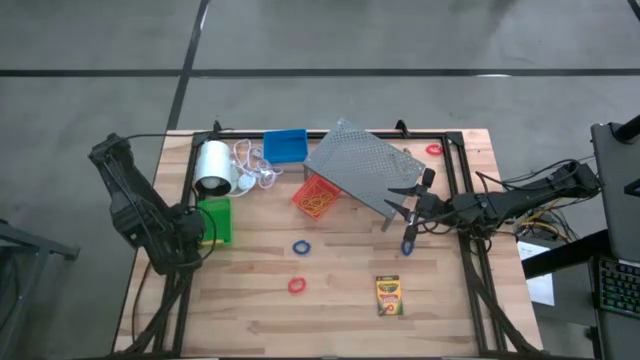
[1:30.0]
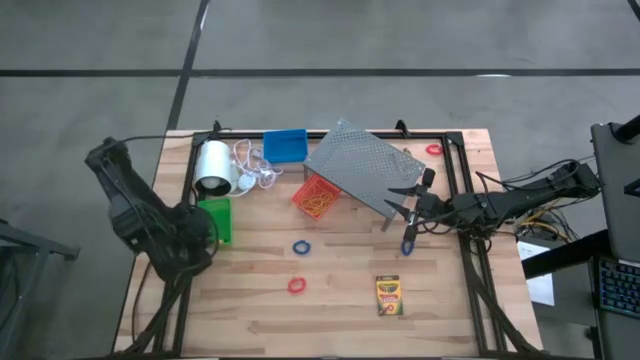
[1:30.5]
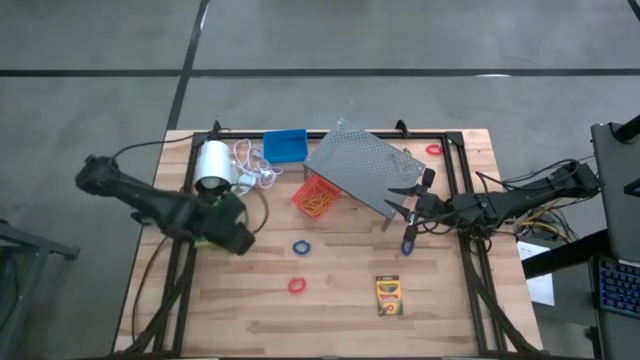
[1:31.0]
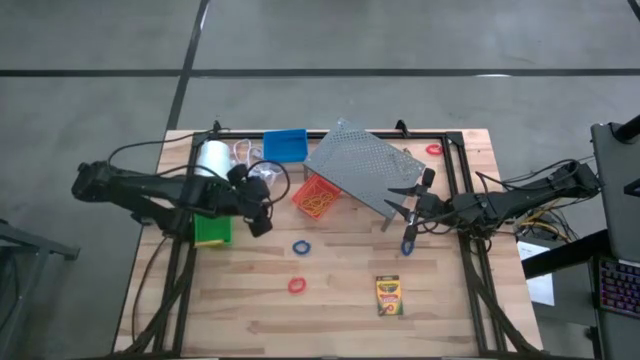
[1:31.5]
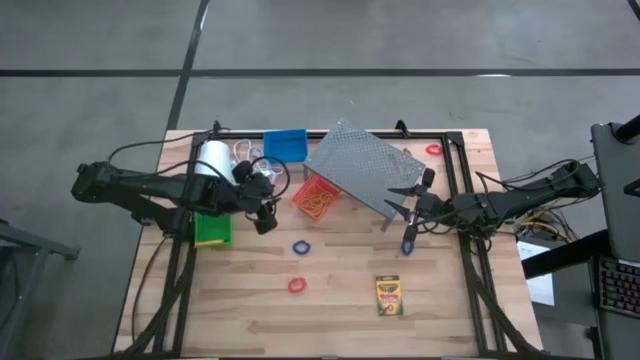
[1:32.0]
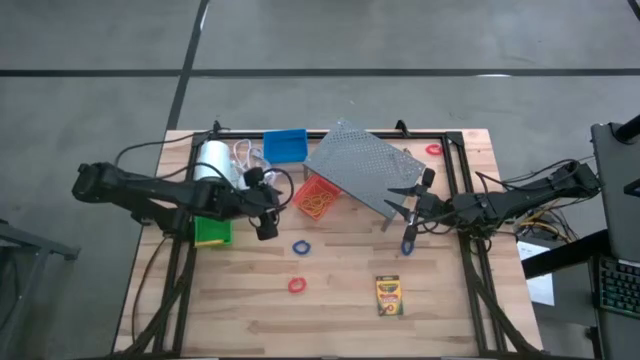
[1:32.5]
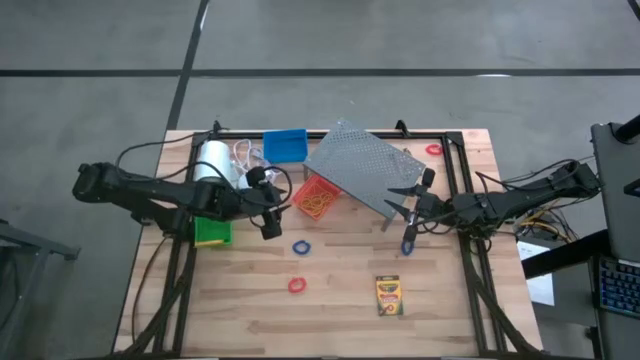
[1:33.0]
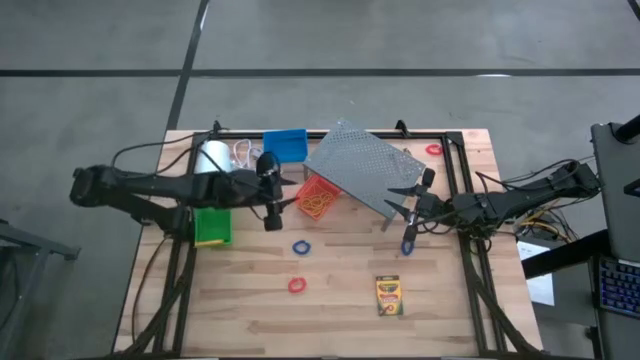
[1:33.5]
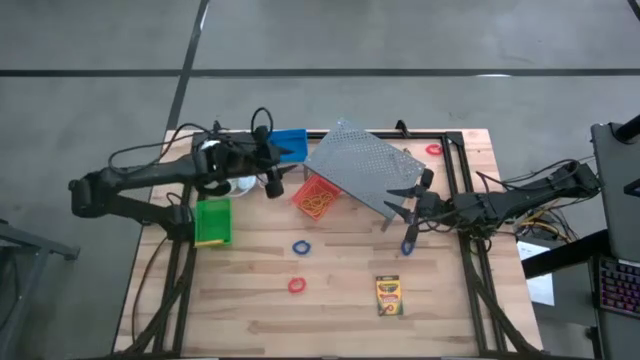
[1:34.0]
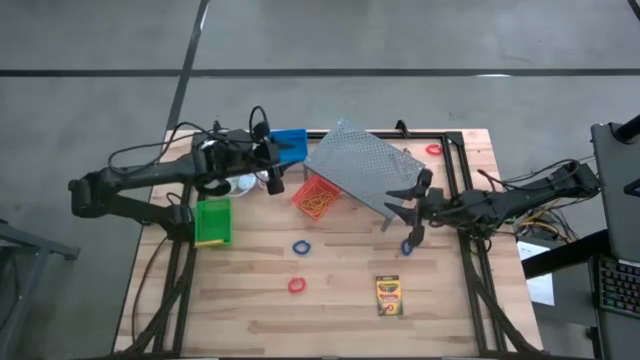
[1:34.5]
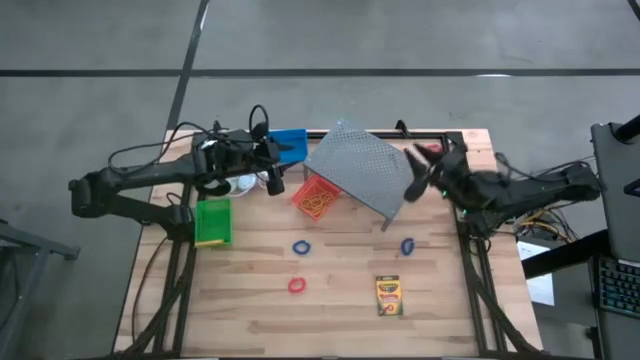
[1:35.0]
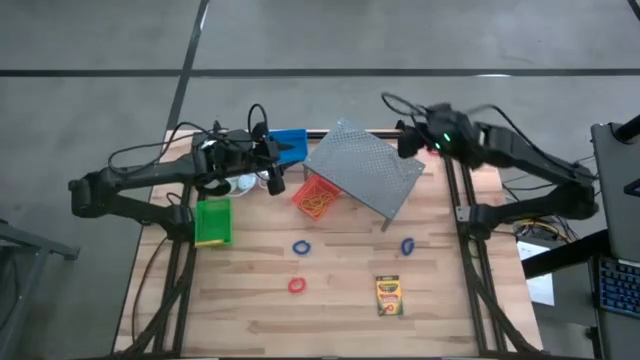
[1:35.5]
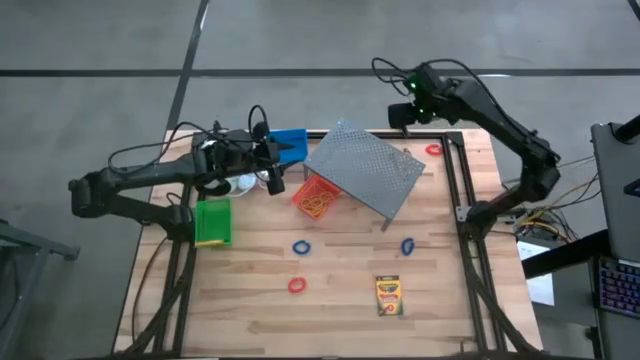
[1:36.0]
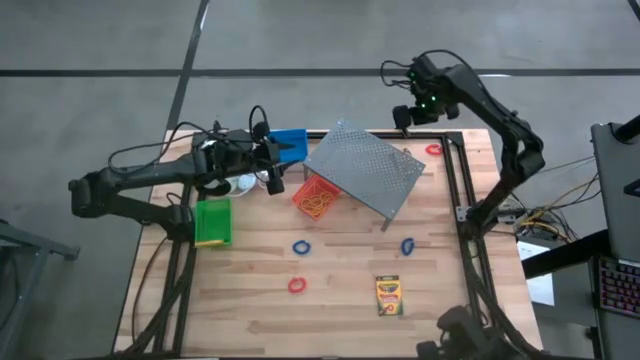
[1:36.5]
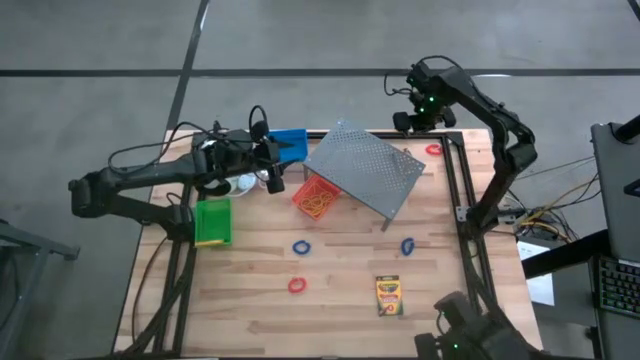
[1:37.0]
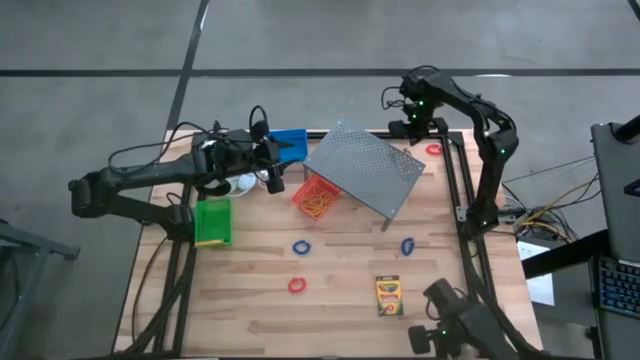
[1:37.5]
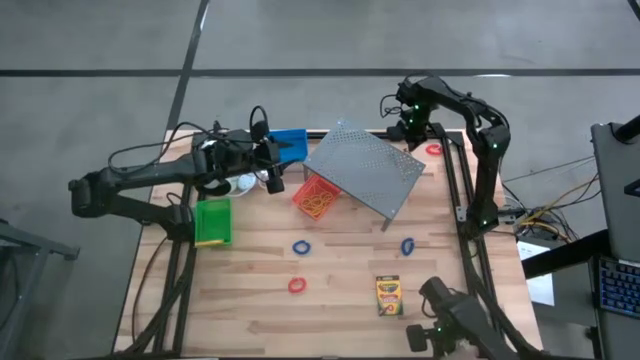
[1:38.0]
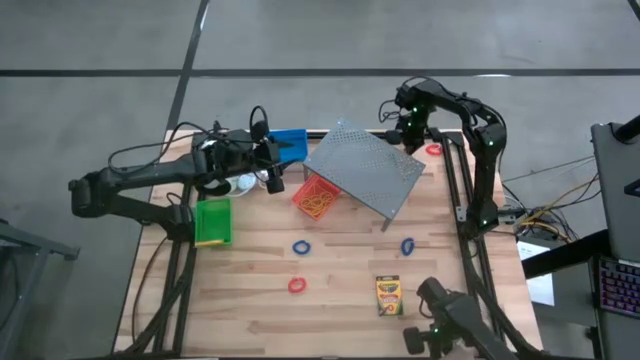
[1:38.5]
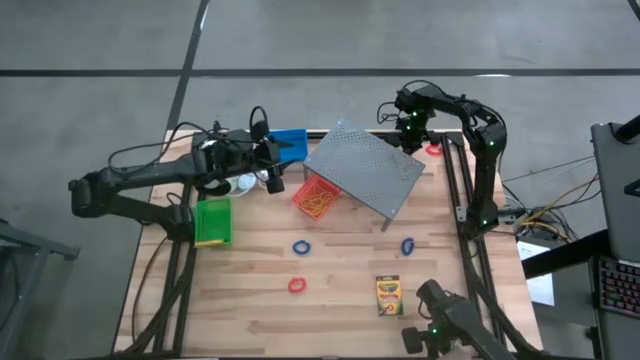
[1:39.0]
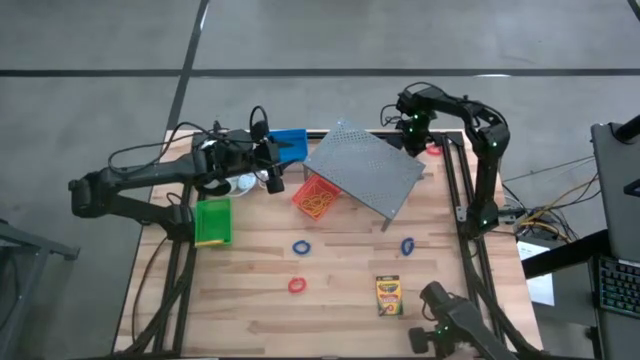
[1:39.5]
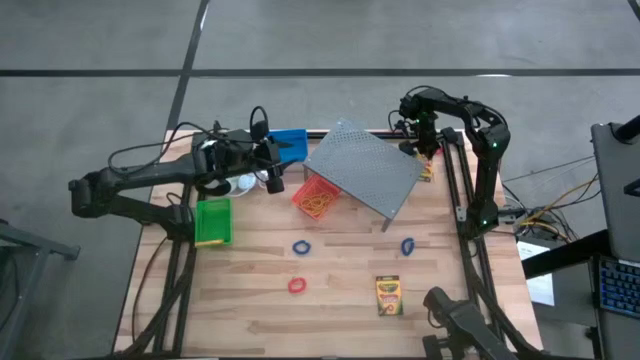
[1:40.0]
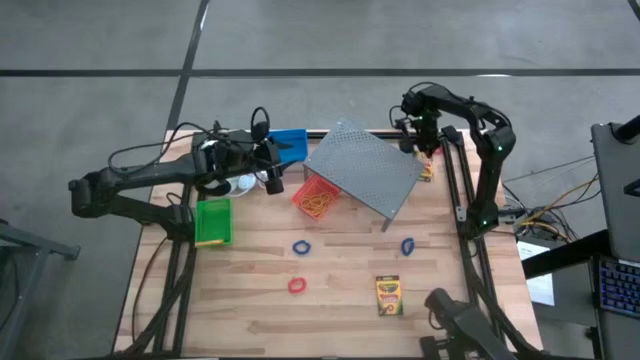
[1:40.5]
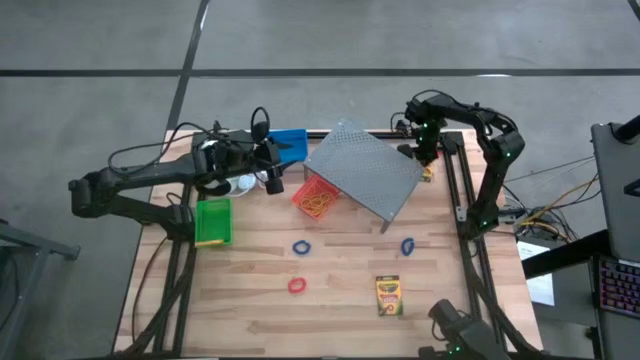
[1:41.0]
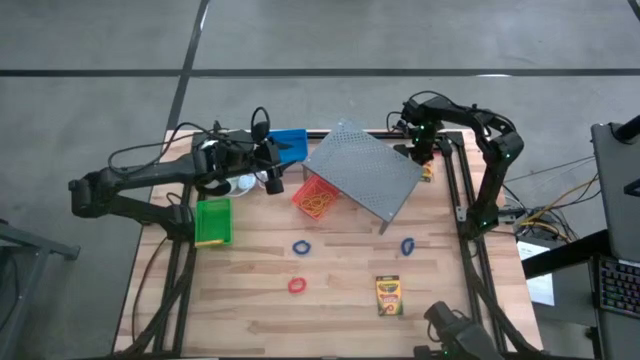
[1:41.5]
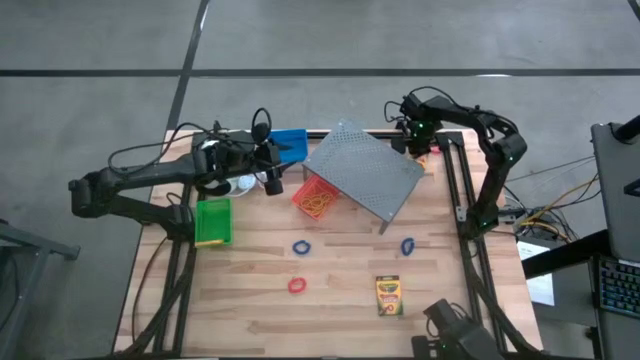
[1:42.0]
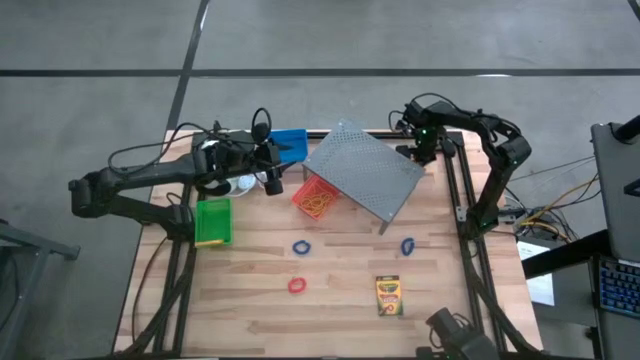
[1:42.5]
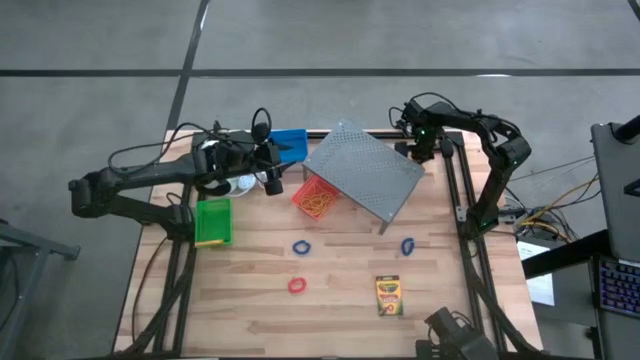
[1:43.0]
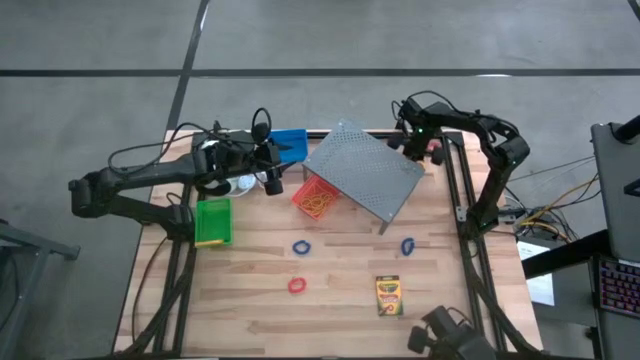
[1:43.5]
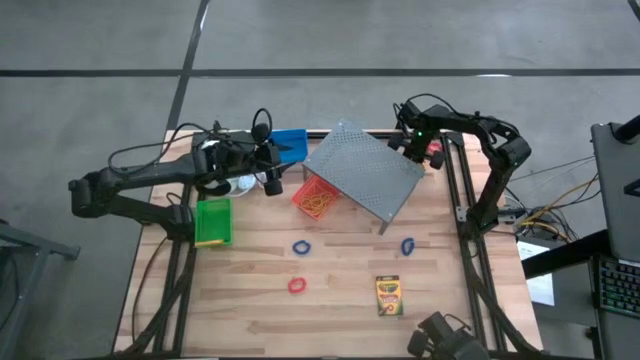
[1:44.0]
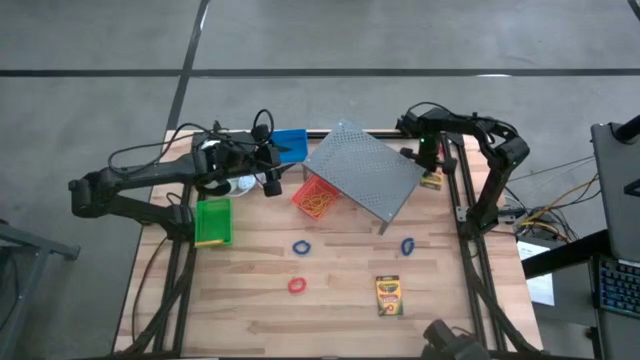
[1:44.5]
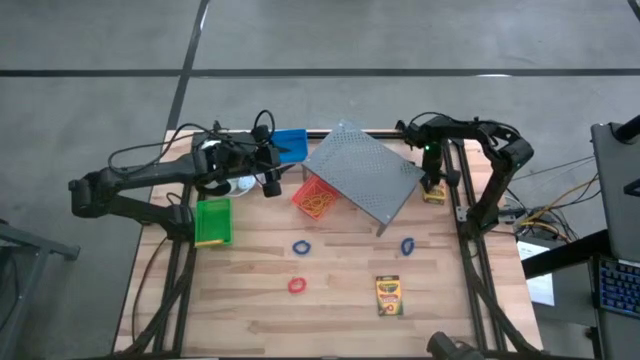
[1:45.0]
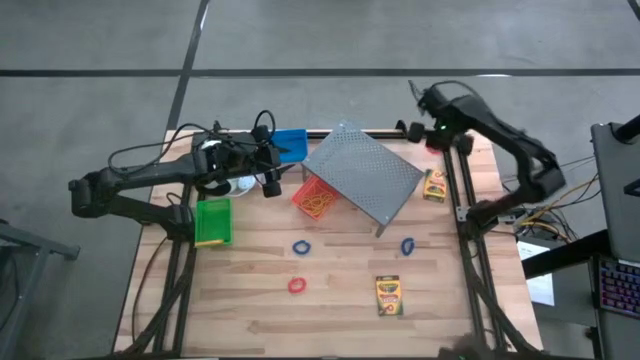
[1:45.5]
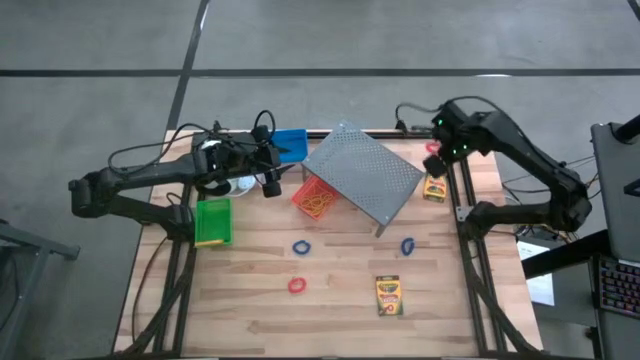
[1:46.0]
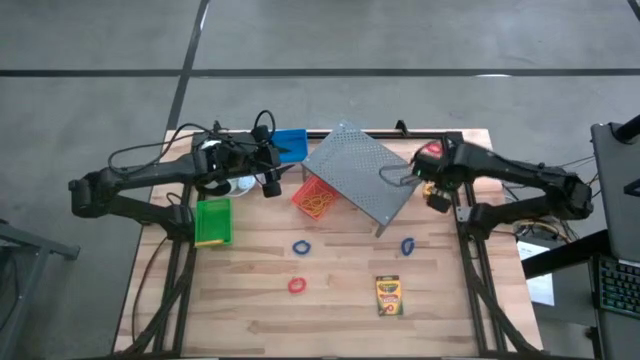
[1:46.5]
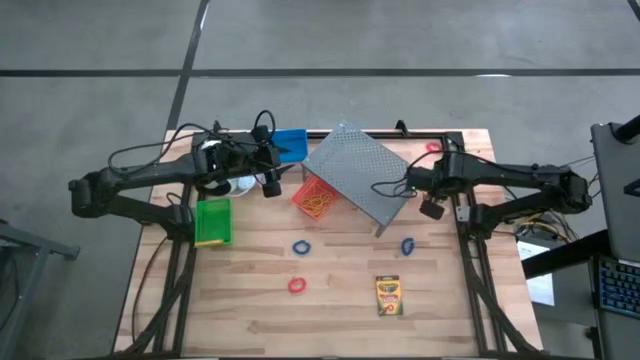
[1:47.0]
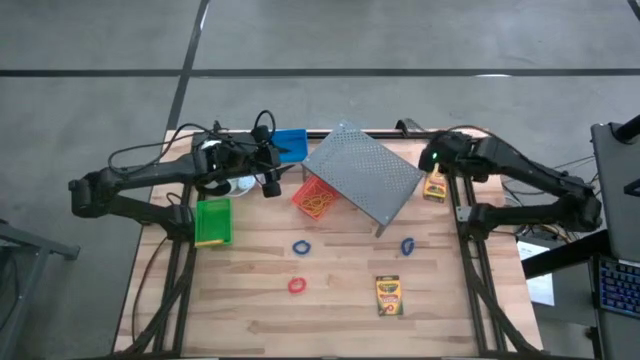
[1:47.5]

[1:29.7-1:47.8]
Task: Pick & Place Office Desk Supplies
Put the crayon box into the green bin

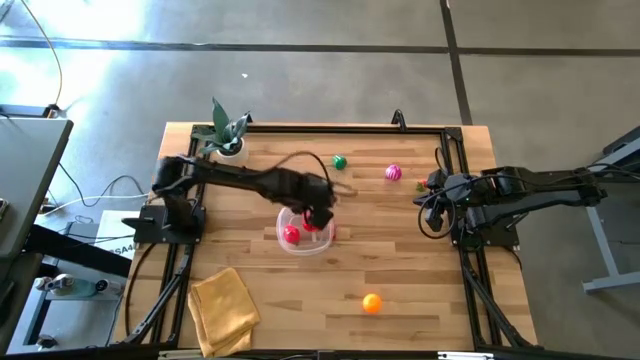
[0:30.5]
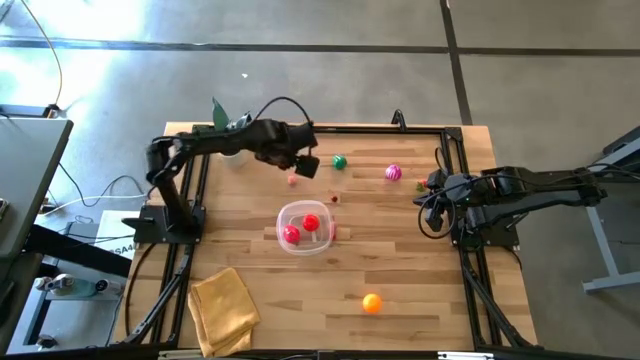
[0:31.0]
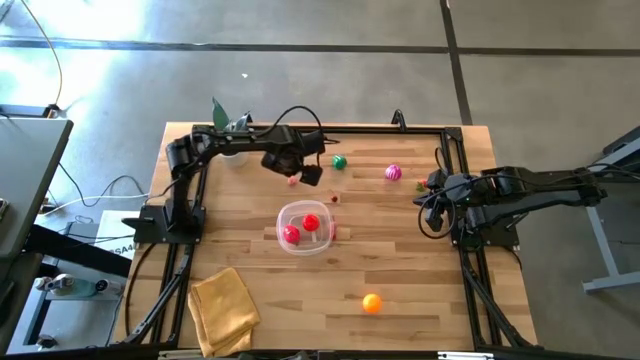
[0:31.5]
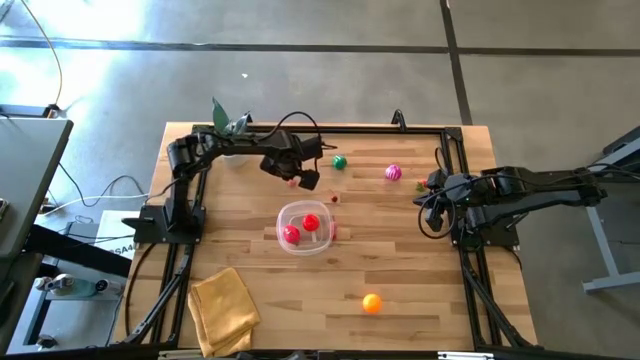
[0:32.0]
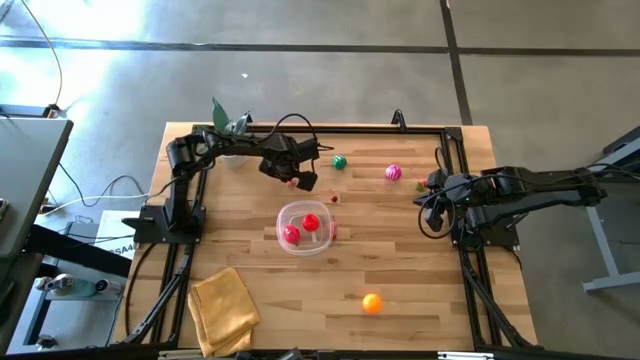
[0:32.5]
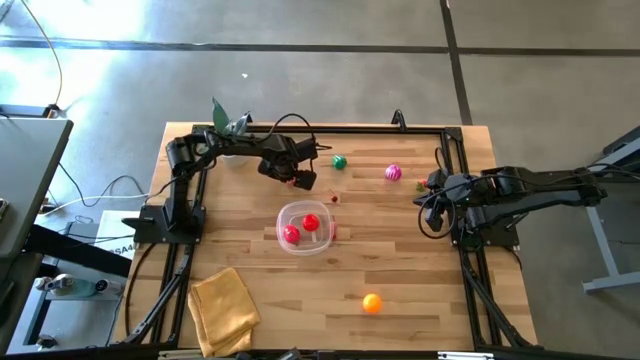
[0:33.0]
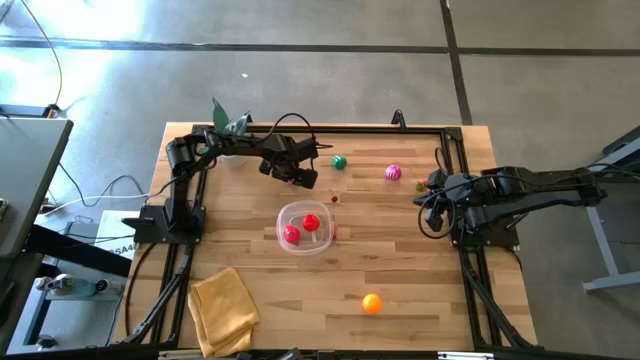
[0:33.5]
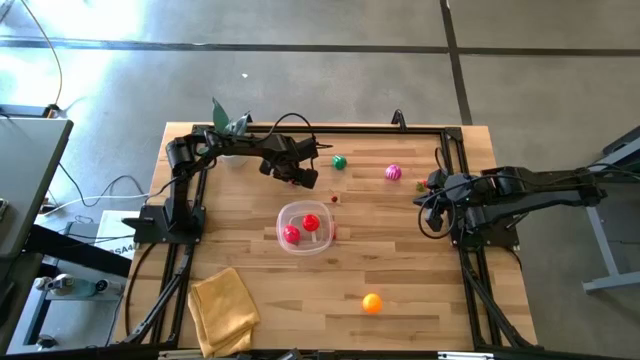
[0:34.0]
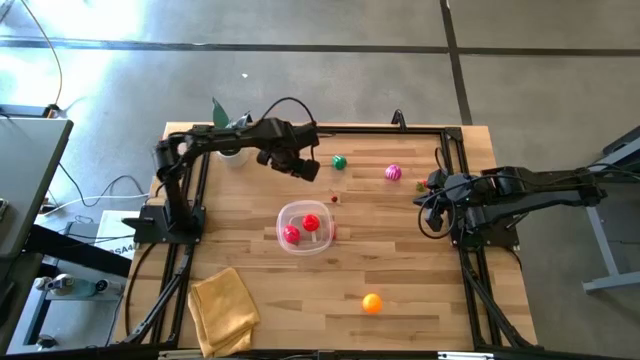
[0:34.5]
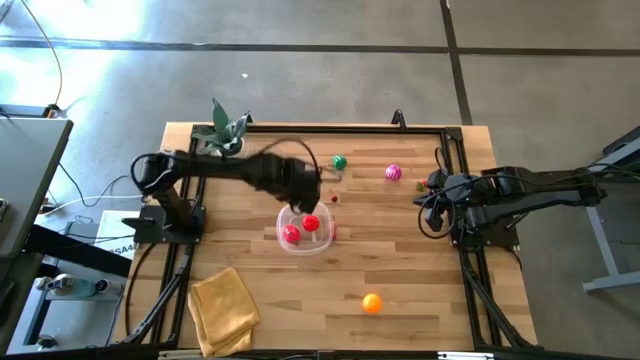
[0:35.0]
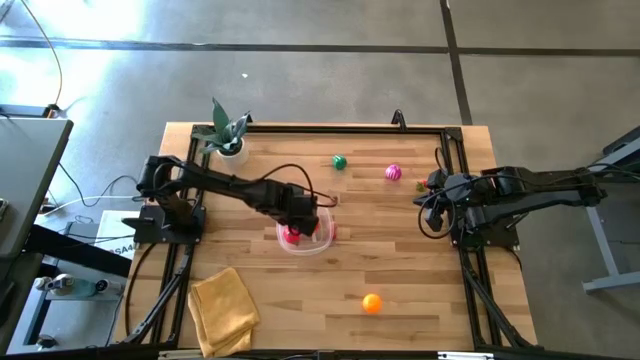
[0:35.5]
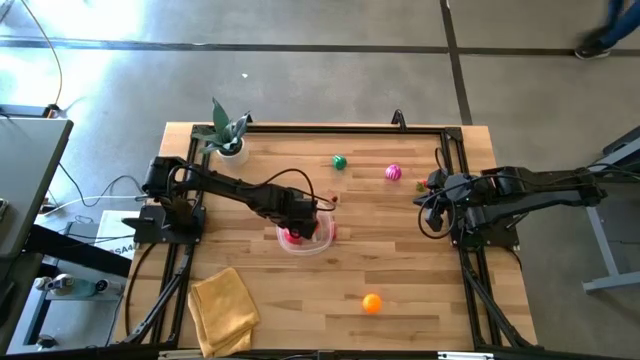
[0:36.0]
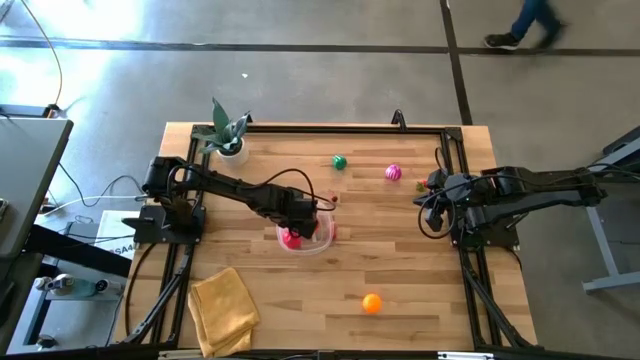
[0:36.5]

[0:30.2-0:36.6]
Task: Pick and placing Produce into tupperware
Put the top pink peach into the transparent container
